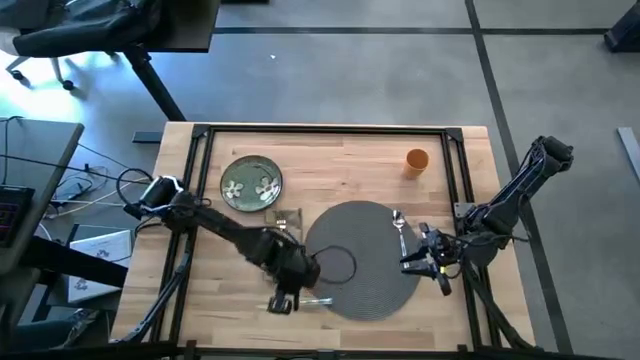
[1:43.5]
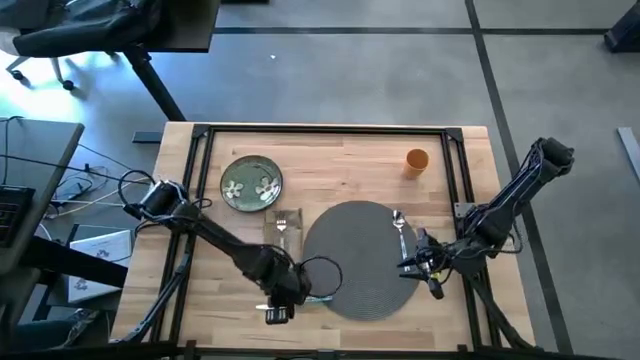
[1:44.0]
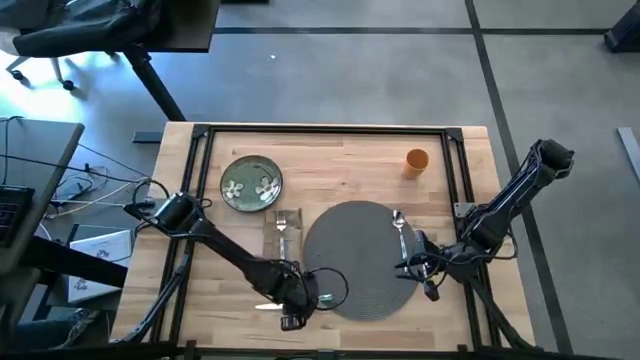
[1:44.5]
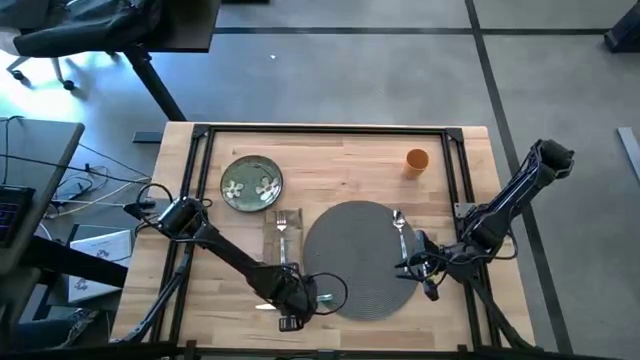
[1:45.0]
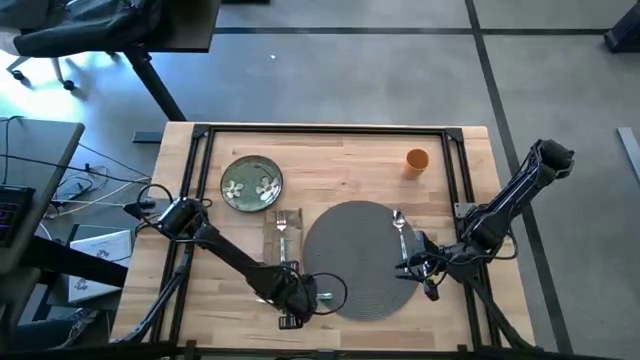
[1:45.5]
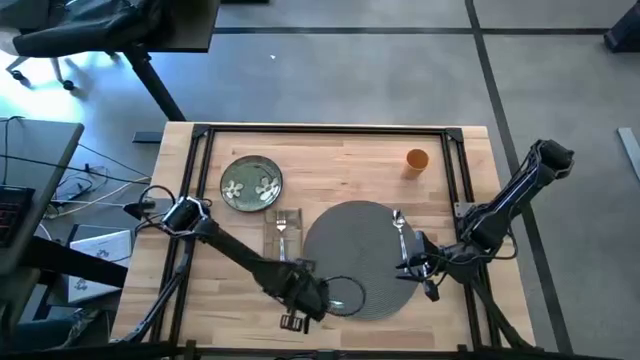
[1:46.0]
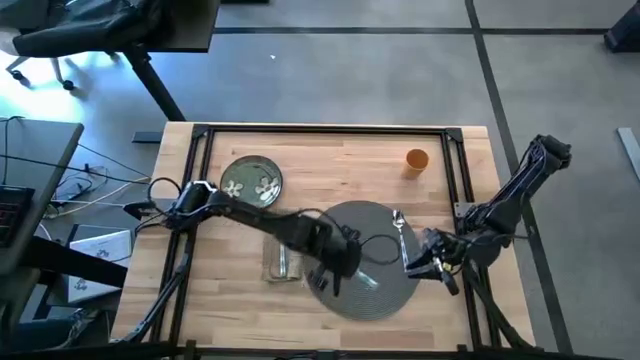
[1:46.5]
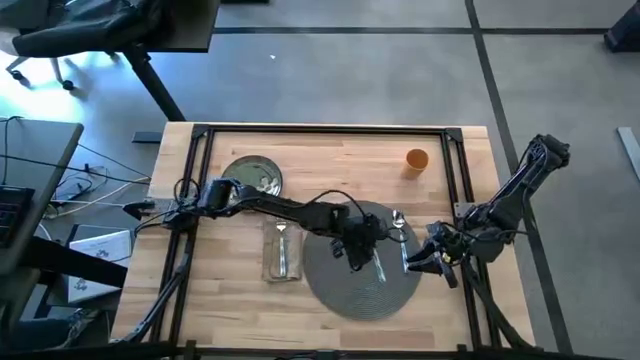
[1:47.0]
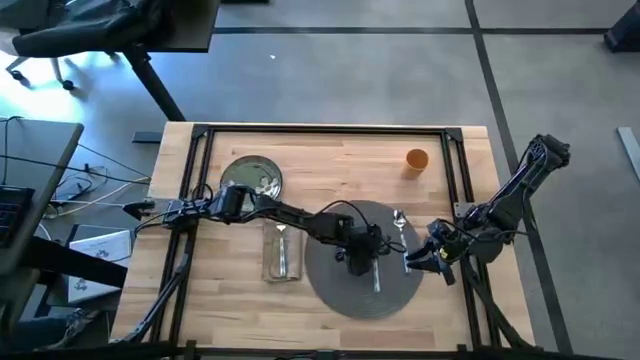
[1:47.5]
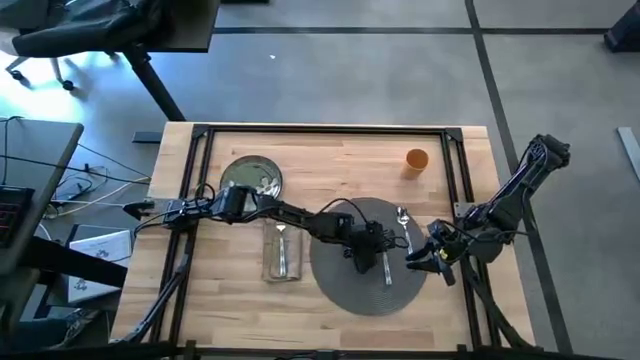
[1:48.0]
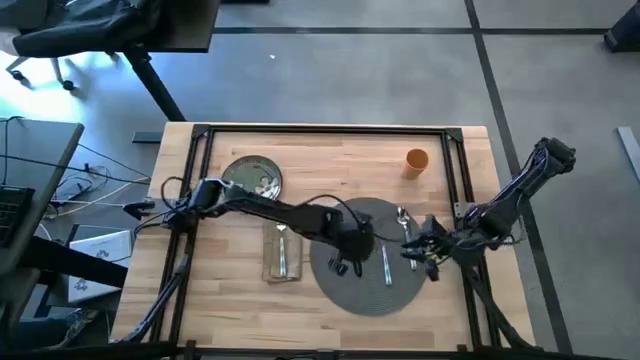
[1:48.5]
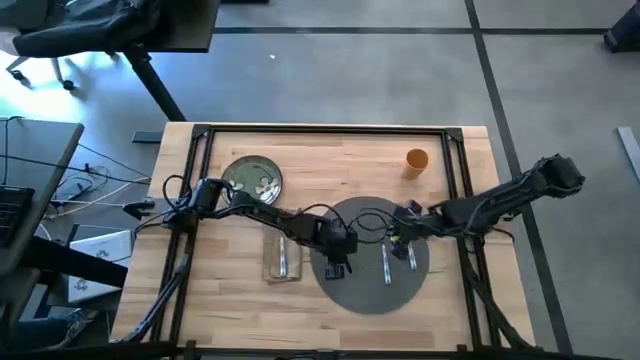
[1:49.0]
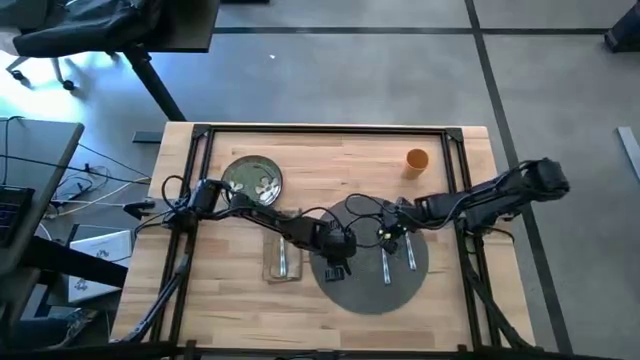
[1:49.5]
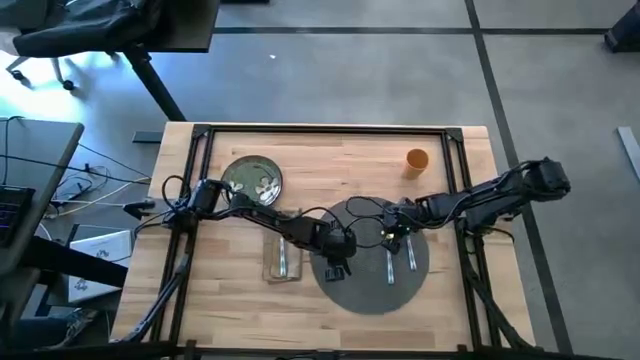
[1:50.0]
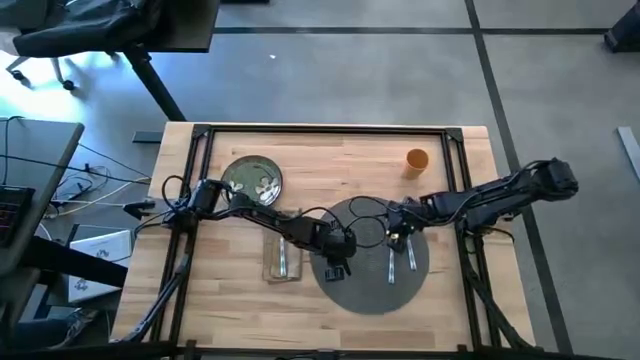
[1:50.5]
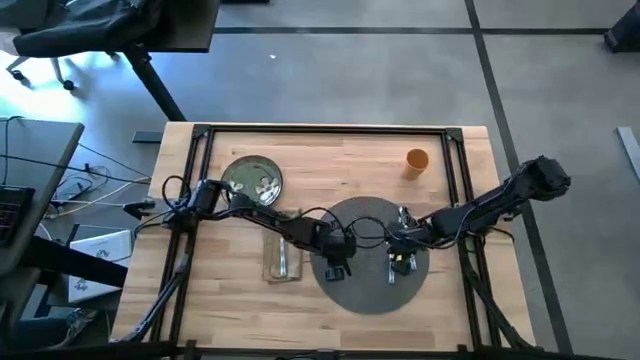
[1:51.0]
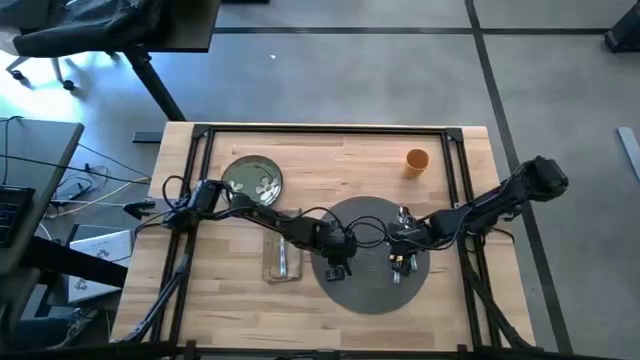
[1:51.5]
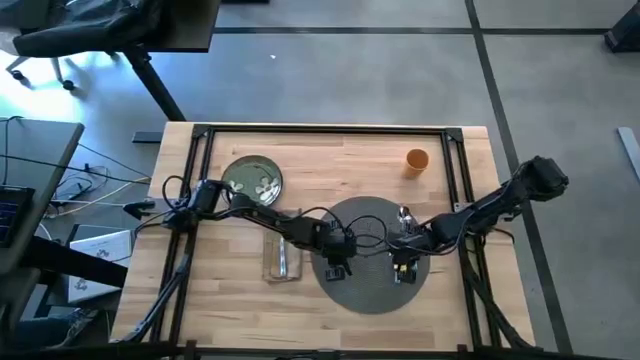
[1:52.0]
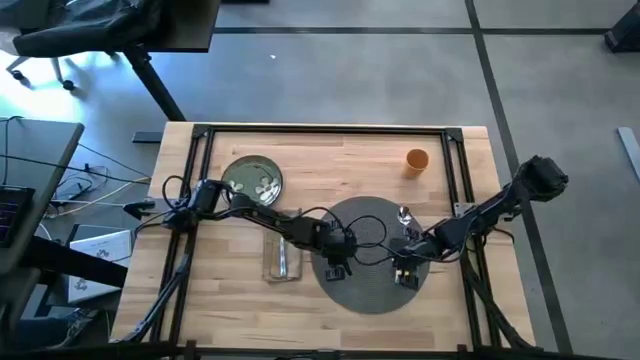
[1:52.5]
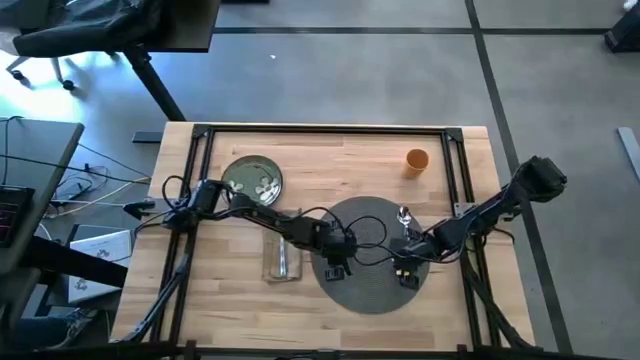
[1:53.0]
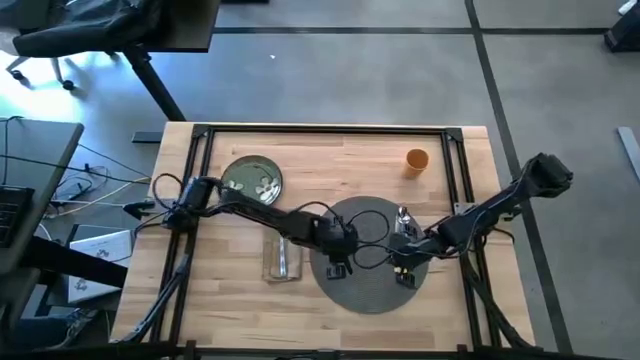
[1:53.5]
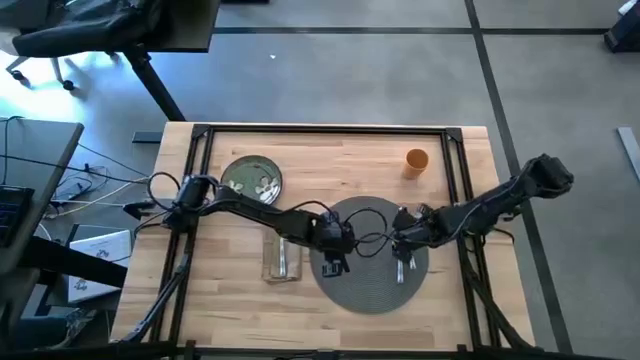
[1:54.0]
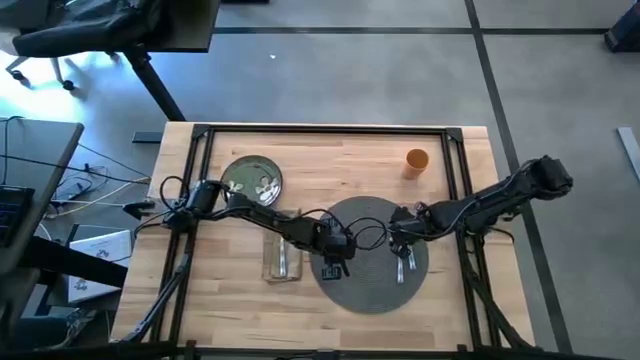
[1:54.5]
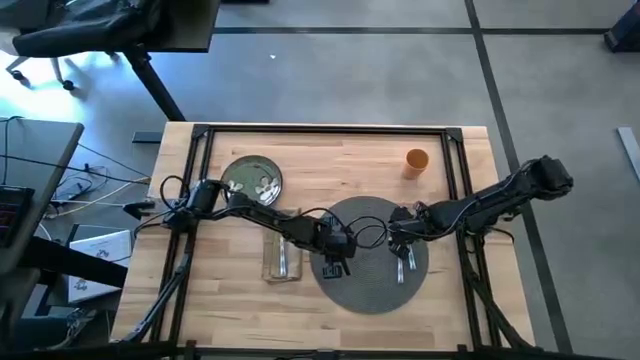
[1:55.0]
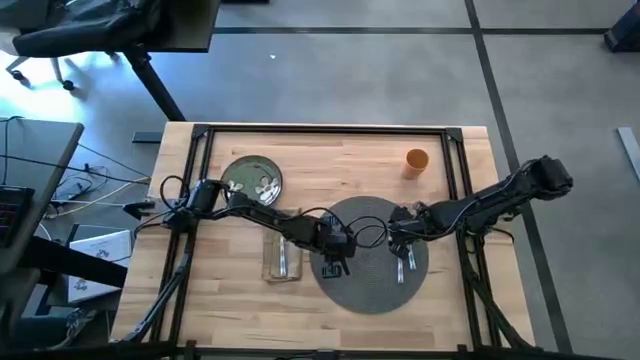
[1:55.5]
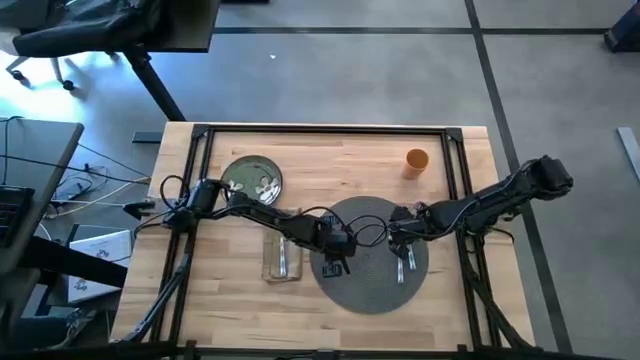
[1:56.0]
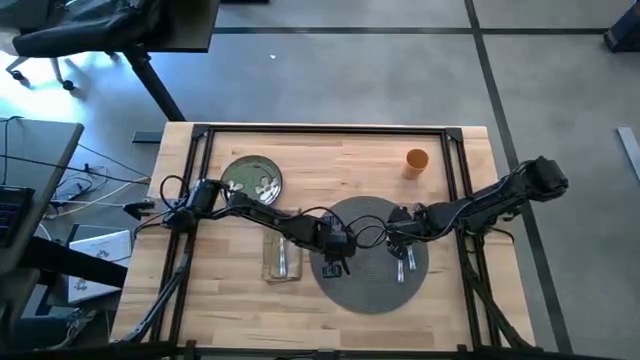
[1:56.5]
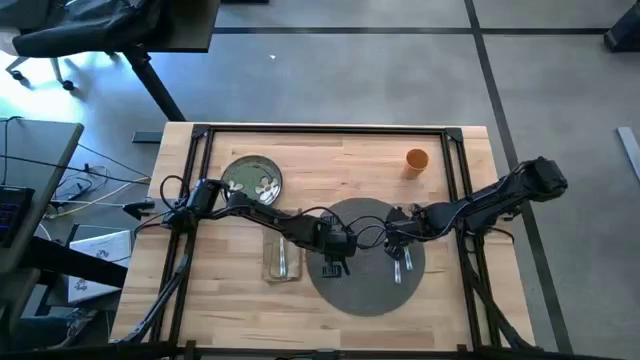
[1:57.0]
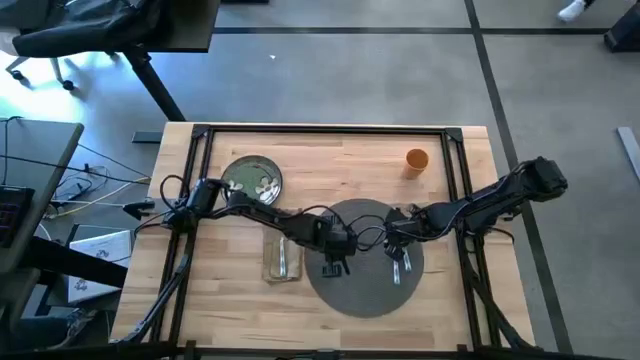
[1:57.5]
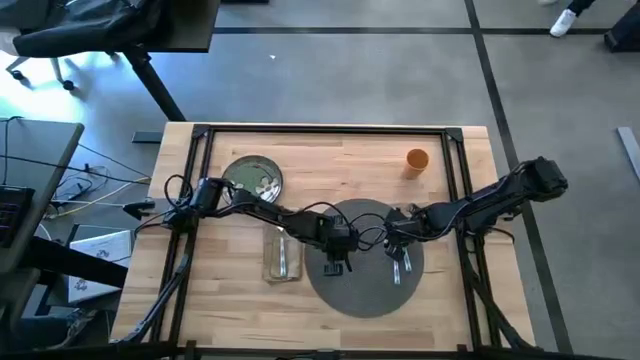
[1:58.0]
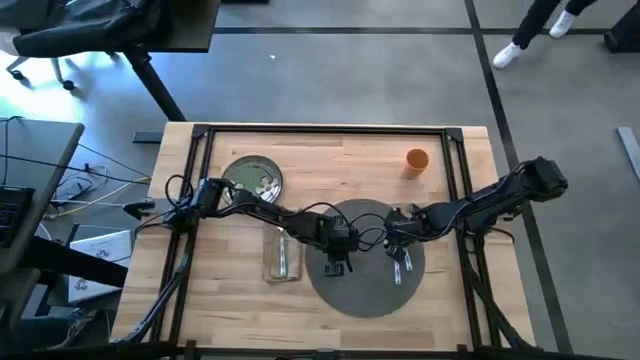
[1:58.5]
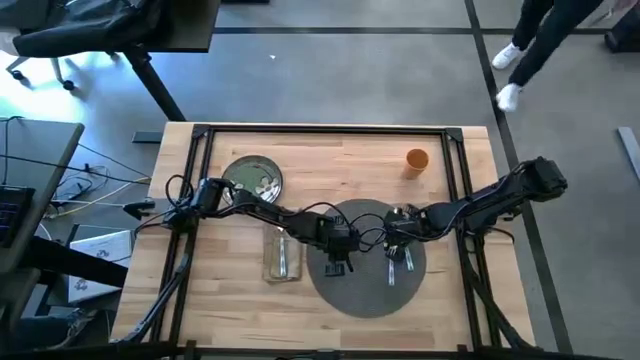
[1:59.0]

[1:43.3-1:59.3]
Task: Set table place
Put the blue table knife to the left of the blue spoon on the gray placemat

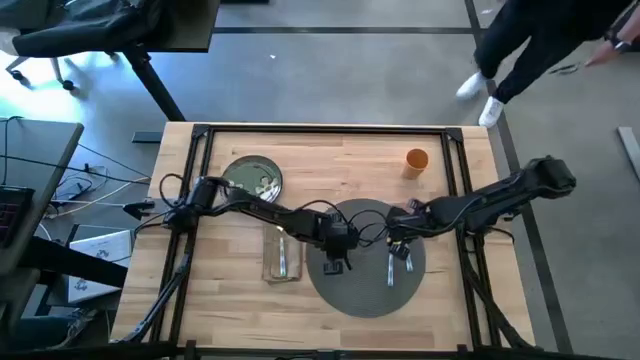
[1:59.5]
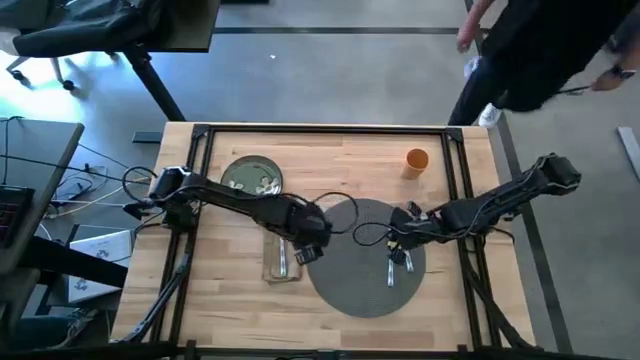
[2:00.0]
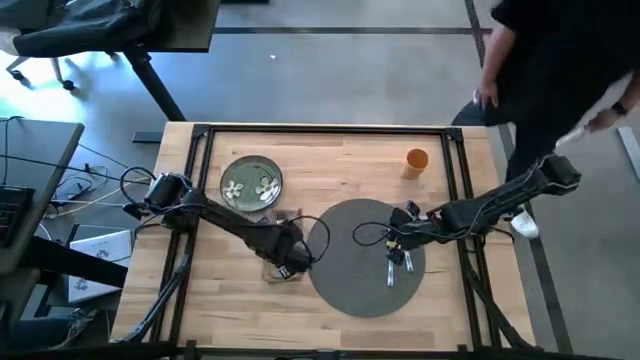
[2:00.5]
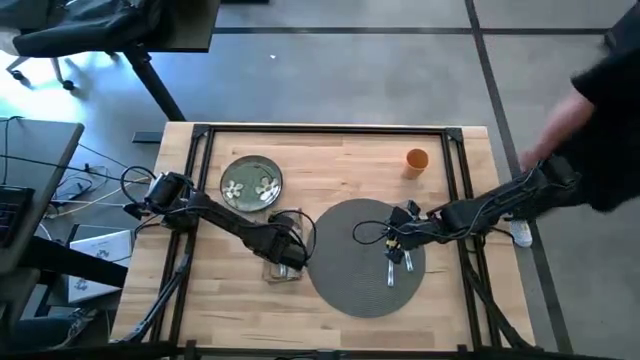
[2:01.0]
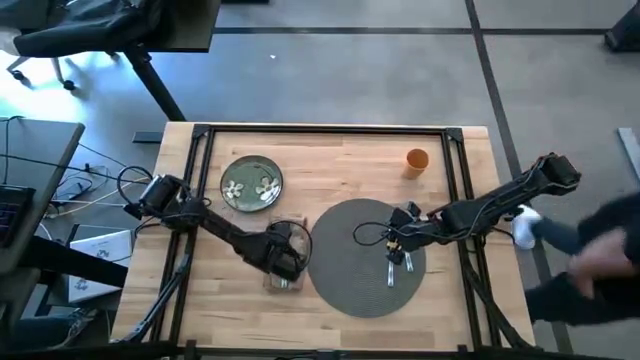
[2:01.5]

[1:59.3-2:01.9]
Adjust the brown table napkin

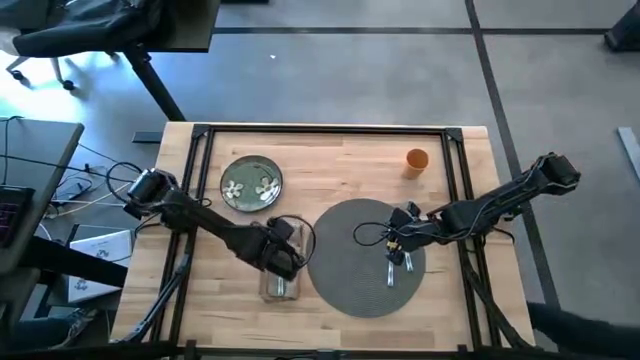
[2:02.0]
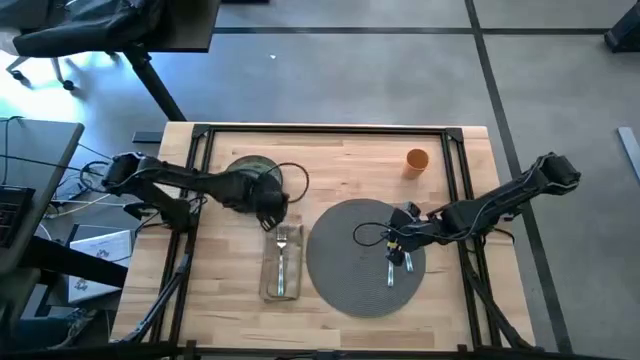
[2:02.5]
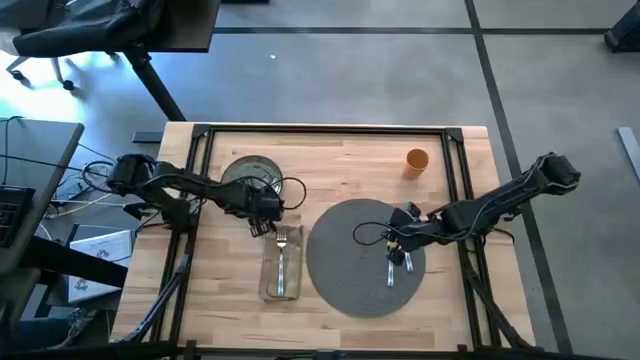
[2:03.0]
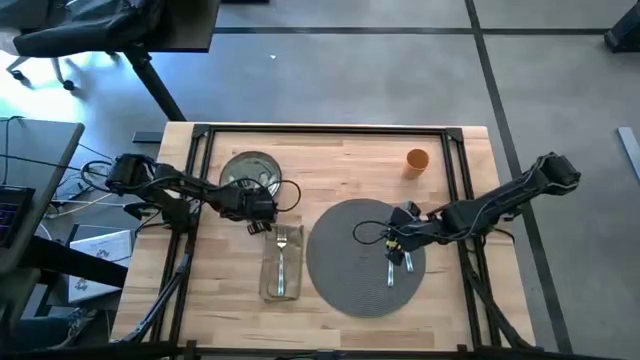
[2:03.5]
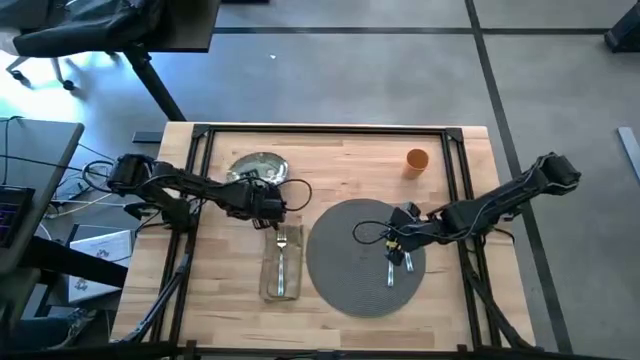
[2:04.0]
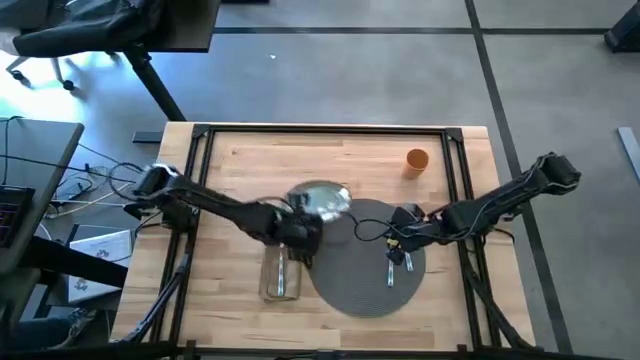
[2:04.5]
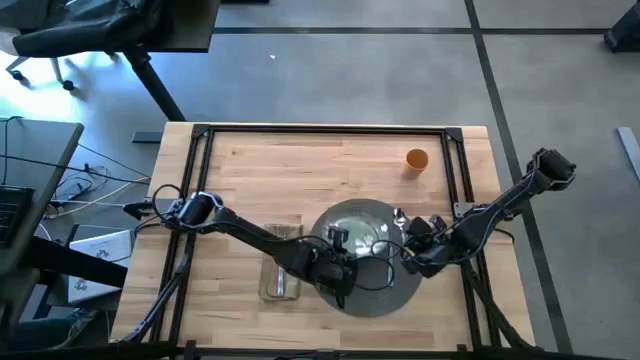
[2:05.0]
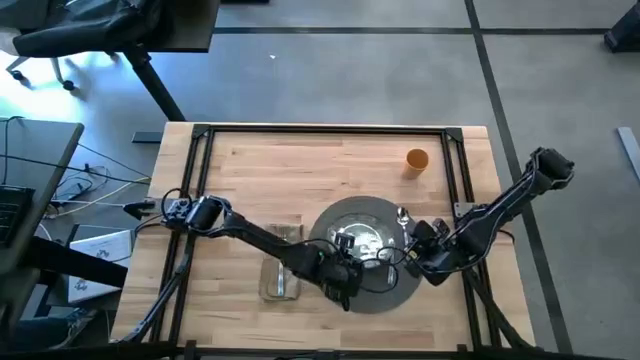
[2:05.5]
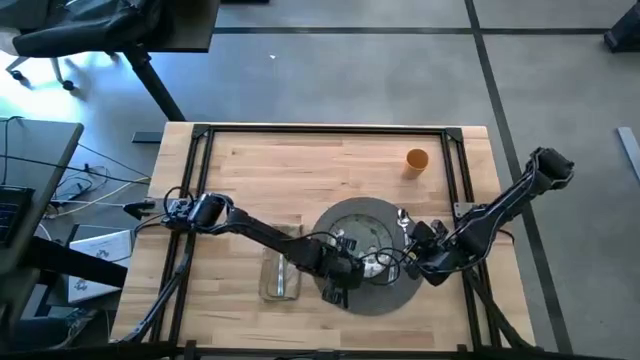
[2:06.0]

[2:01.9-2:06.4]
Put the green plate to the left of the blue table knife on the gray placemat
